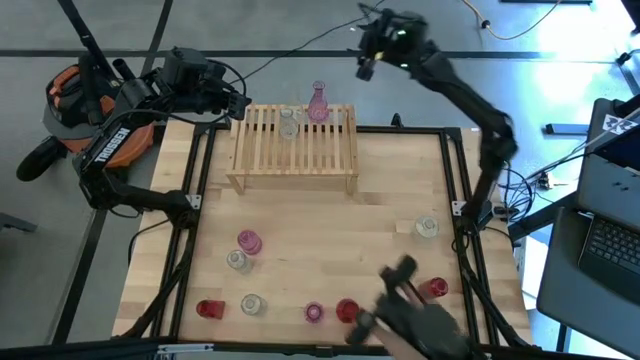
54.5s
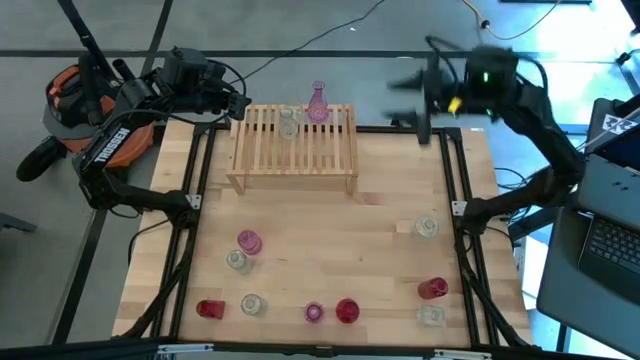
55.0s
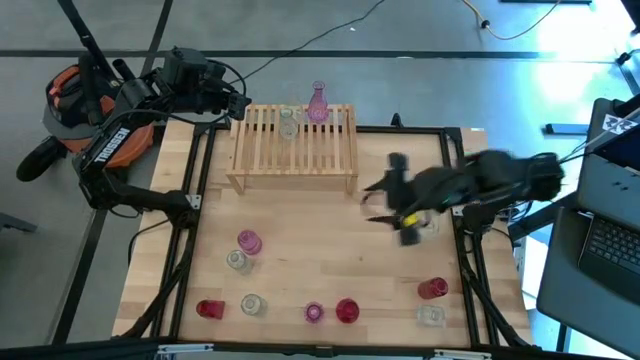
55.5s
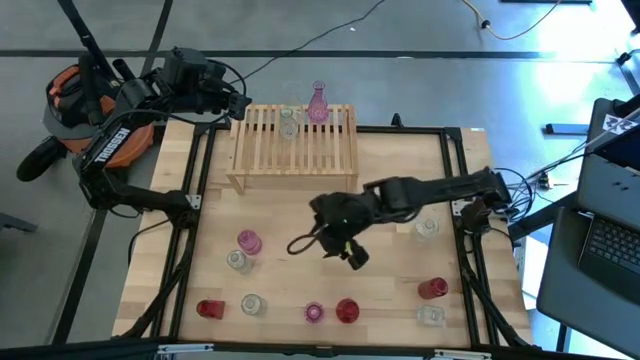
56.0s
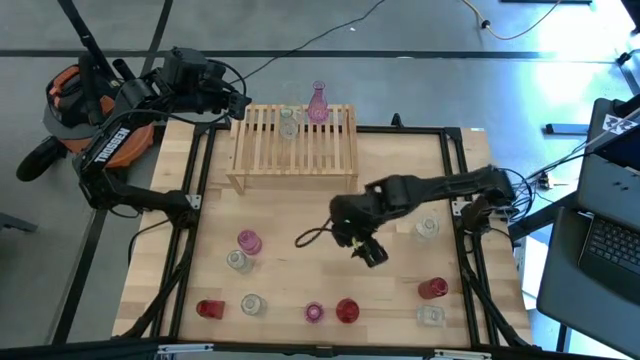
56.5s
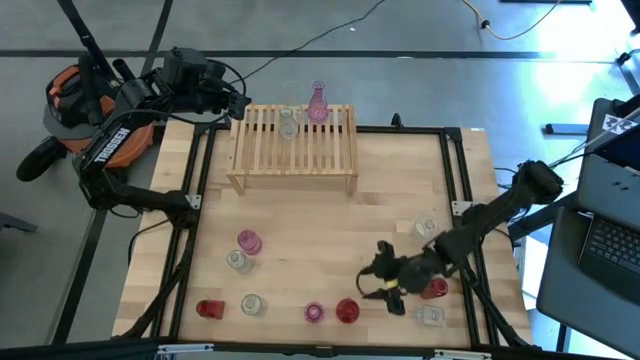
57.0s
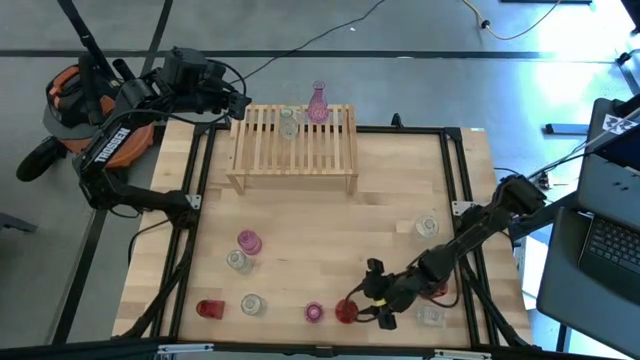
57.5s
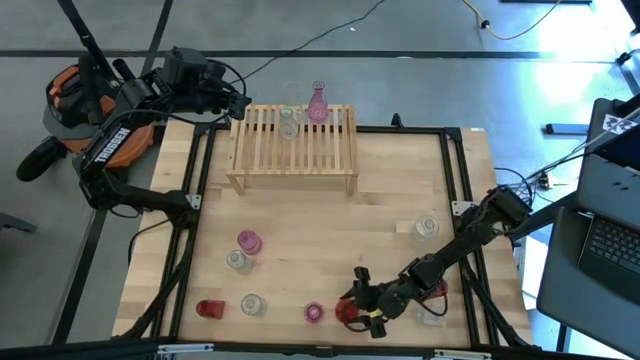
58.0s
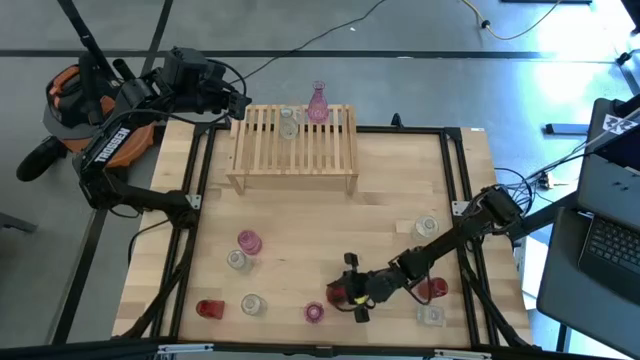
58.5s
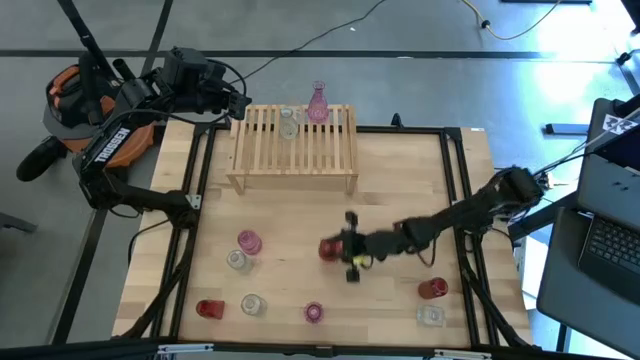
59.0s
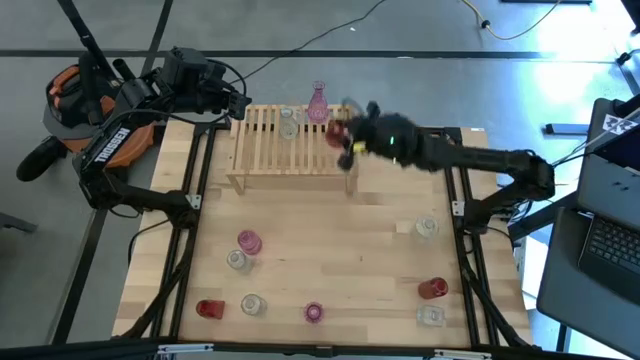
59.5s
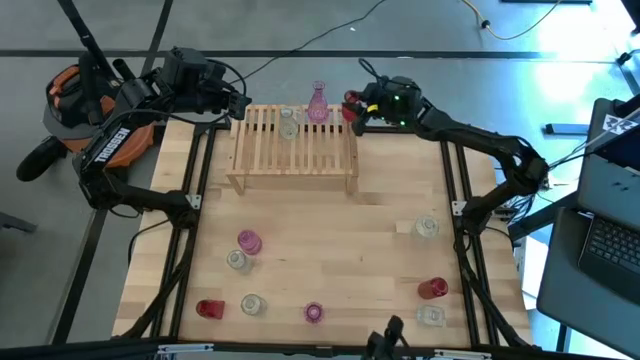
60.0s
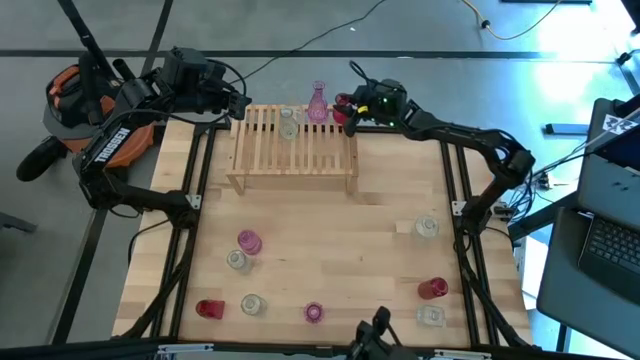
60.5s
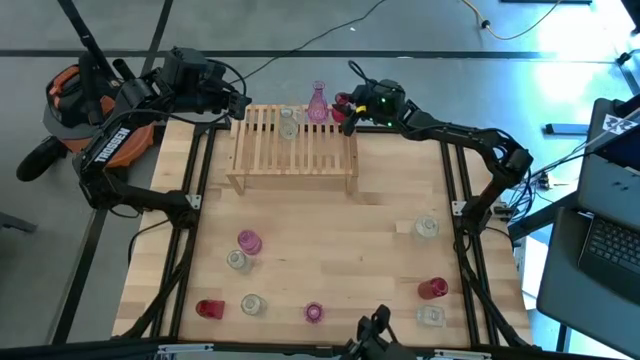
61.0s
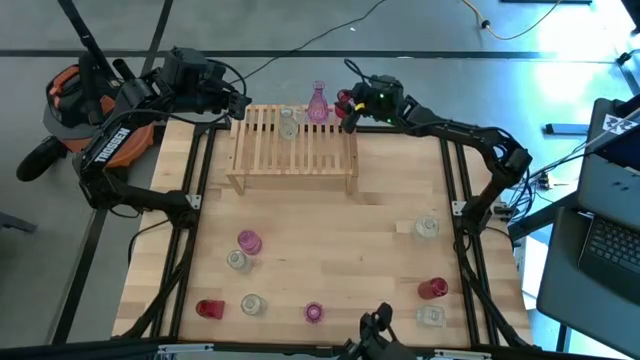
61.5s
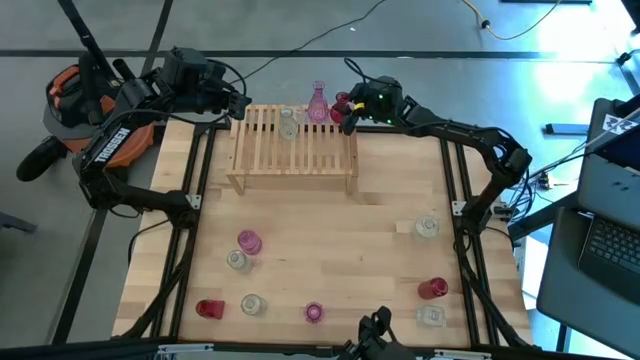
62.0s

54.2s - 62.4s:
Task: sort vases onto shelf
Put the red vase on the shelf

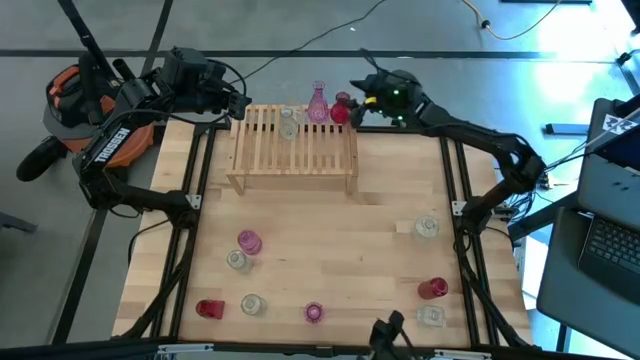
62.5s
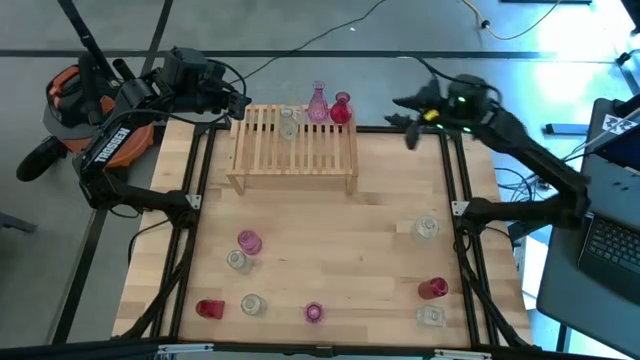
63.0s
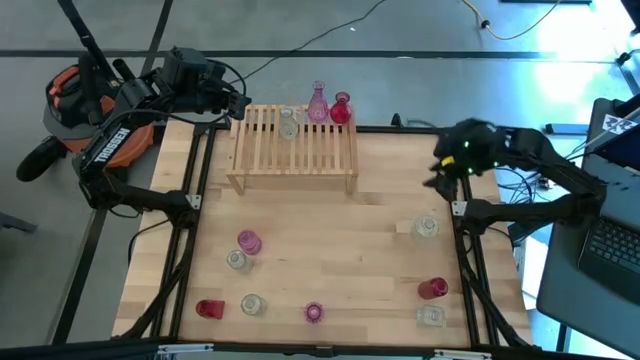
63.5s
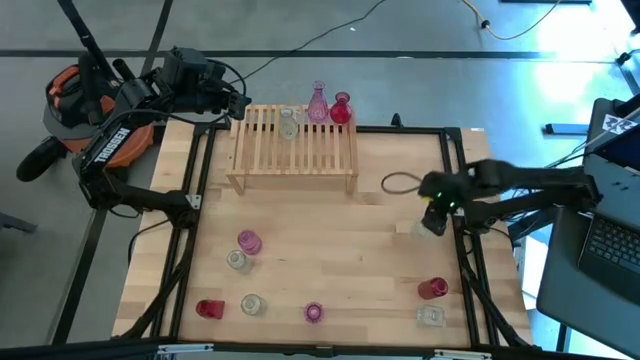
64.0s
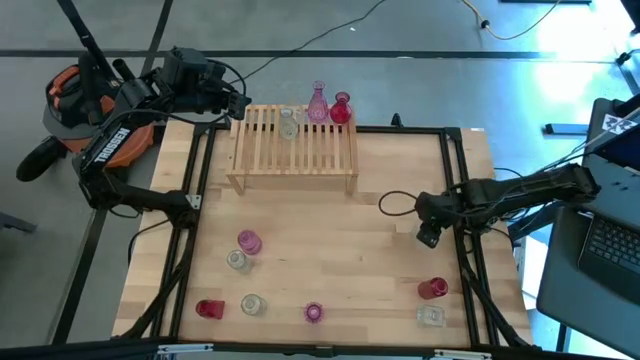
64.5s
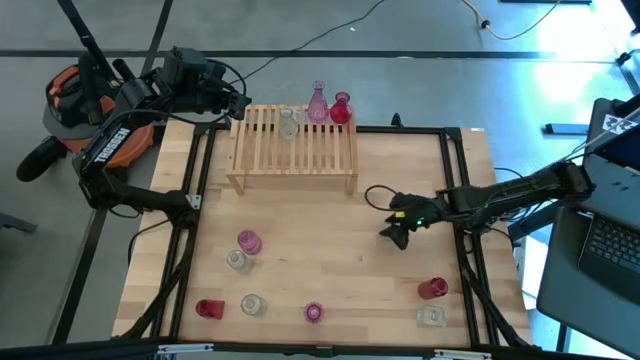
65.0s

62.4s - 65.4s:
Put the transparent vase on the shelf aligned with the other transparent vases on the right

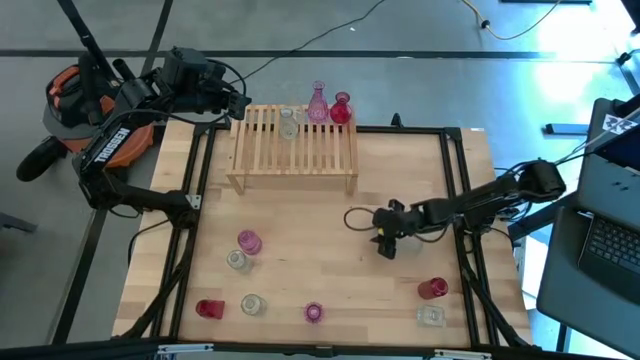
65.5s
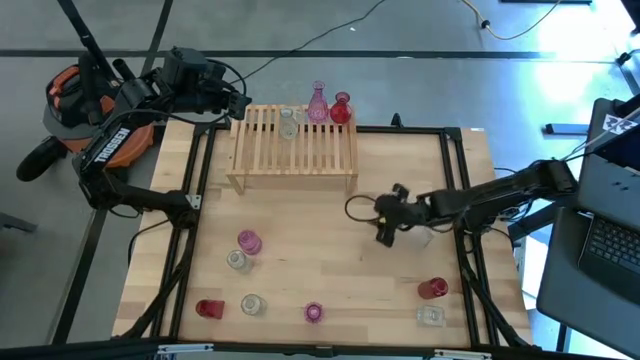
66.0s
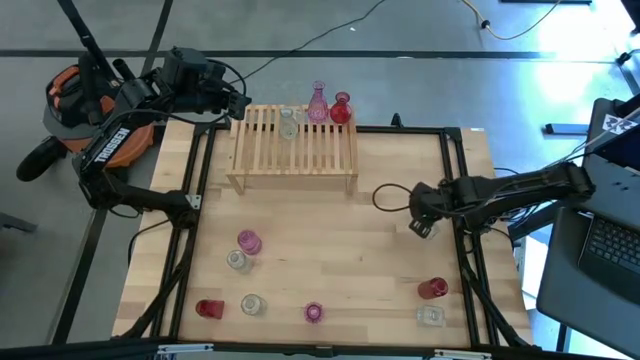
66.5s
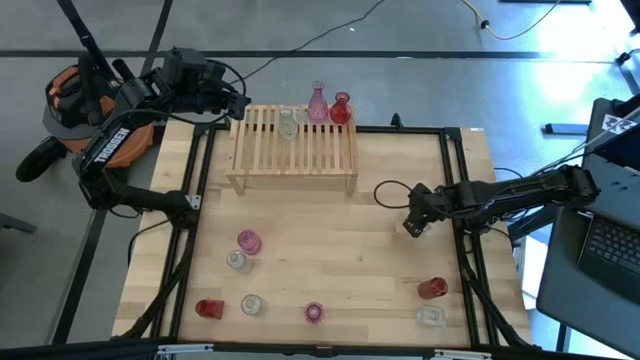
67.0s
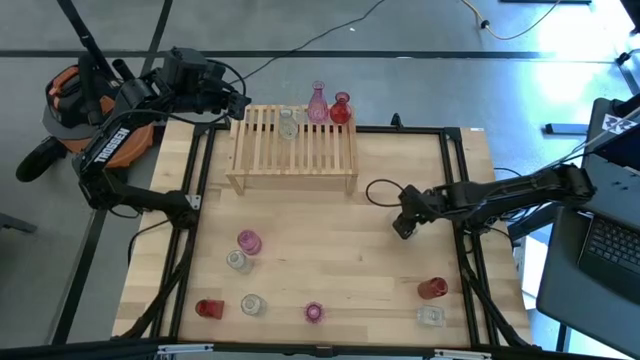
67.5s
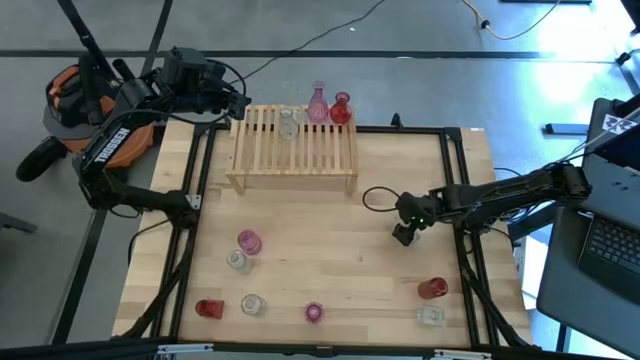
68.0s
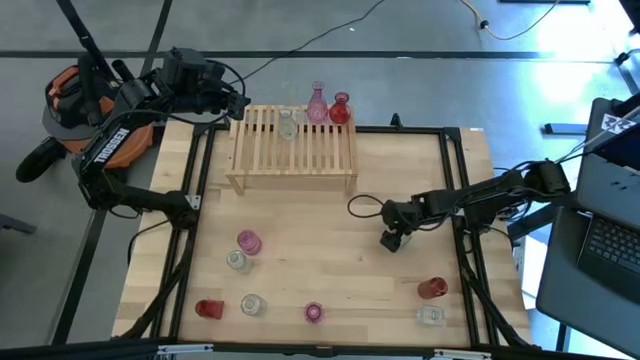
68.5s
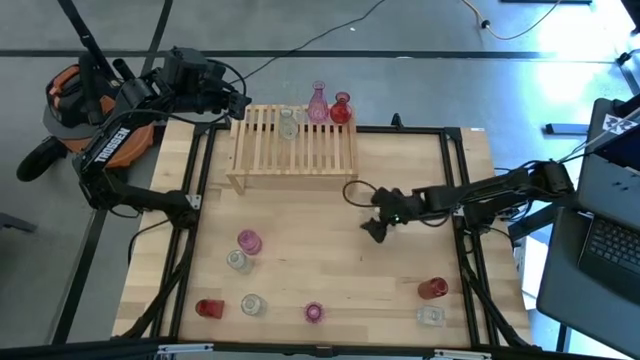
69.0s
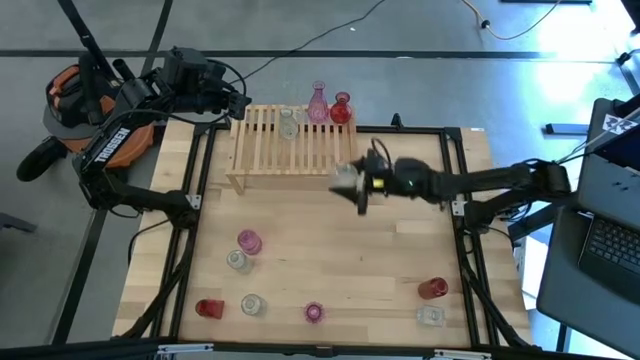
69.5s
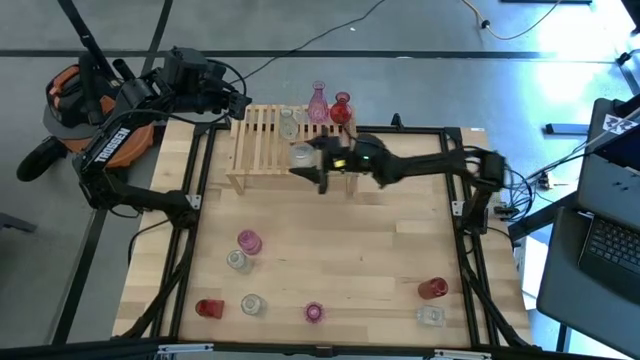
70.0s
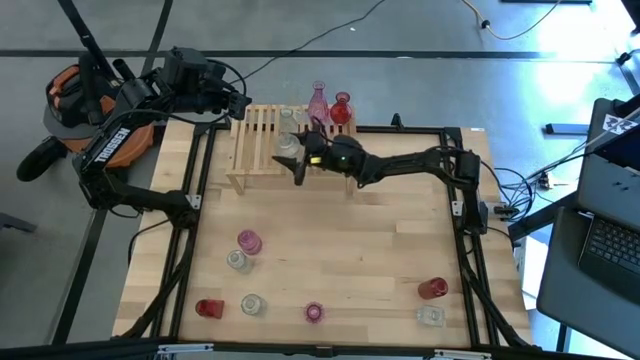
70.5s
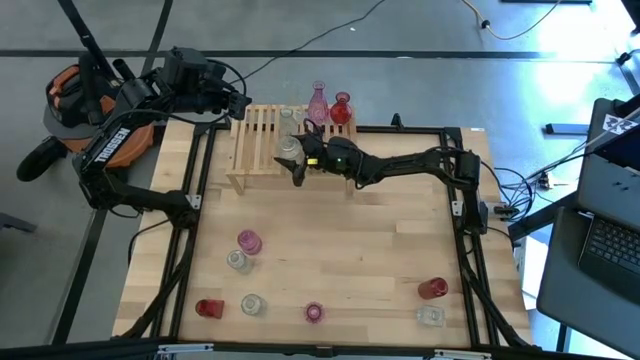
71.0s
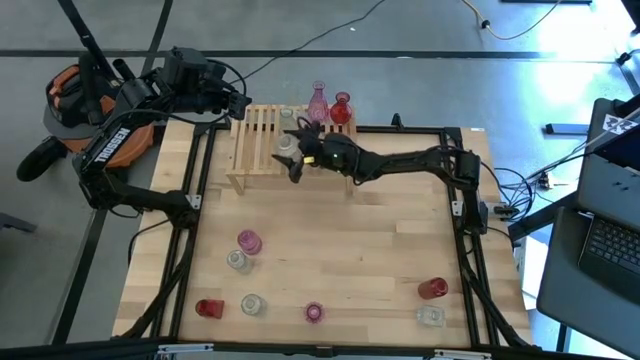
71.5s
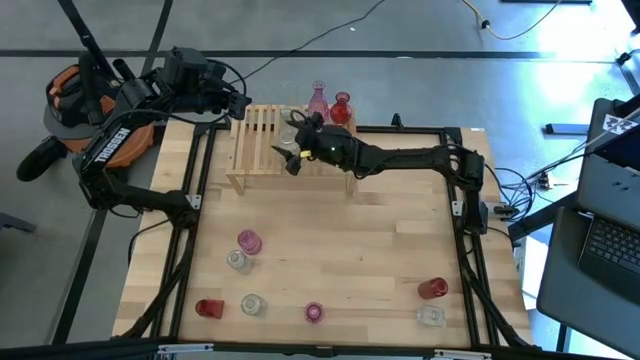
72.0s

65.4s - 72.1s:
Put the transparent vase on the shelf aligned with the other transparent vases on the right

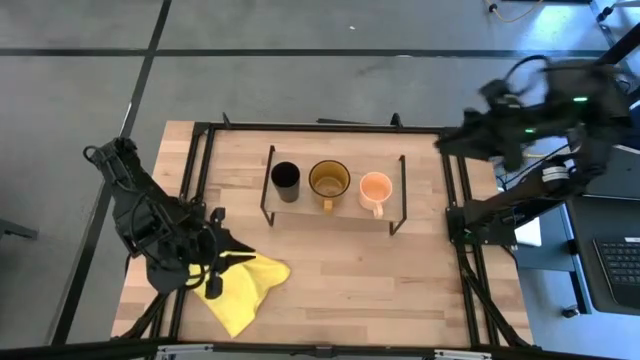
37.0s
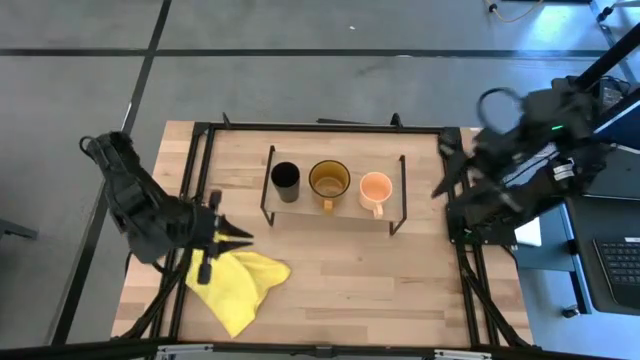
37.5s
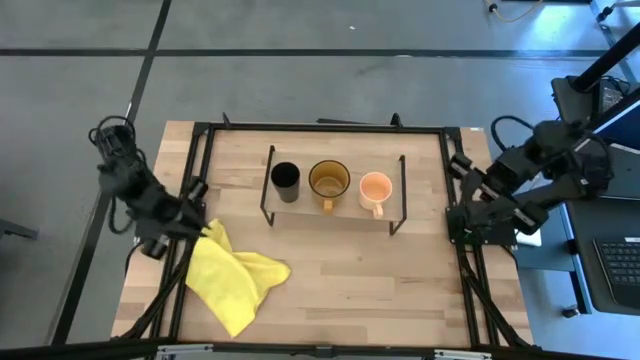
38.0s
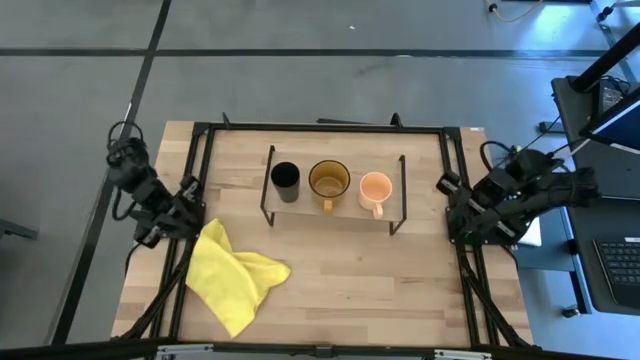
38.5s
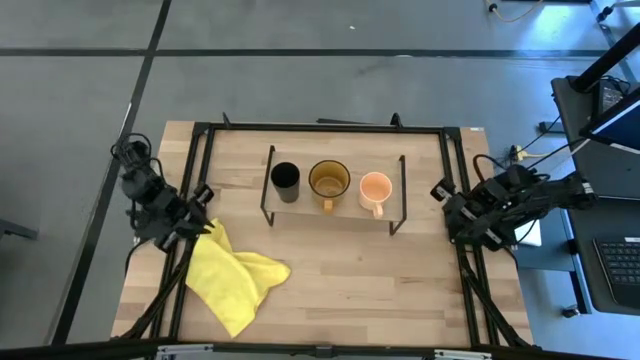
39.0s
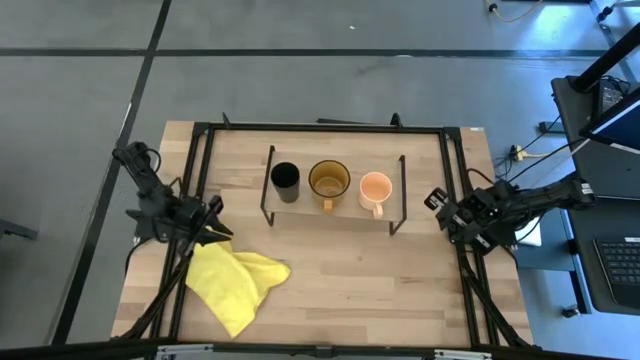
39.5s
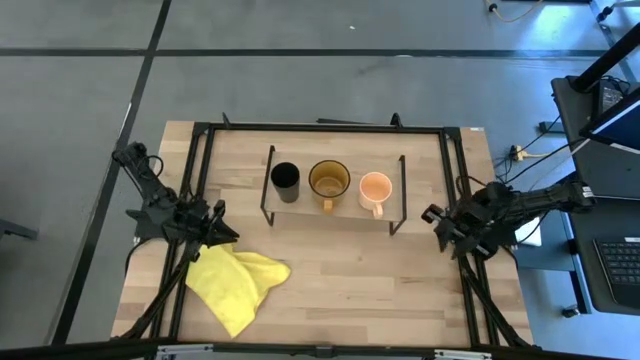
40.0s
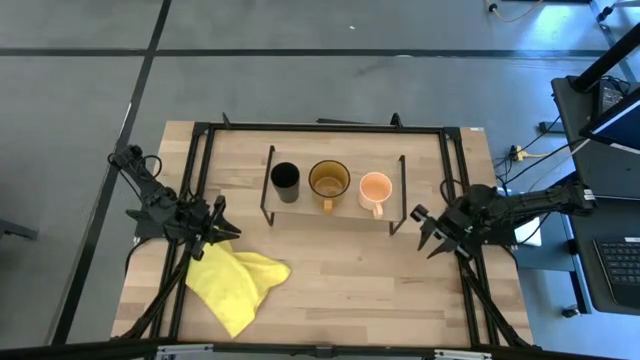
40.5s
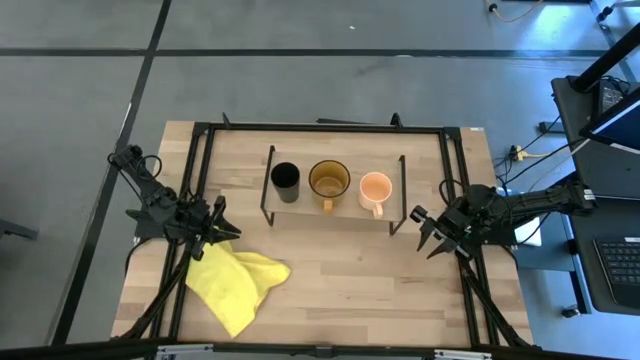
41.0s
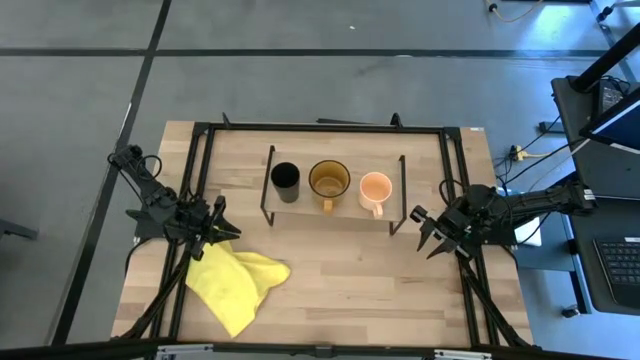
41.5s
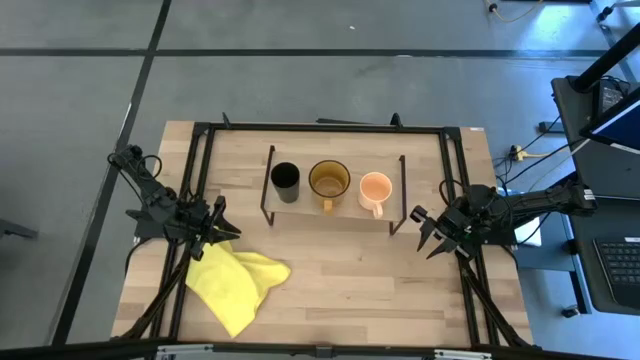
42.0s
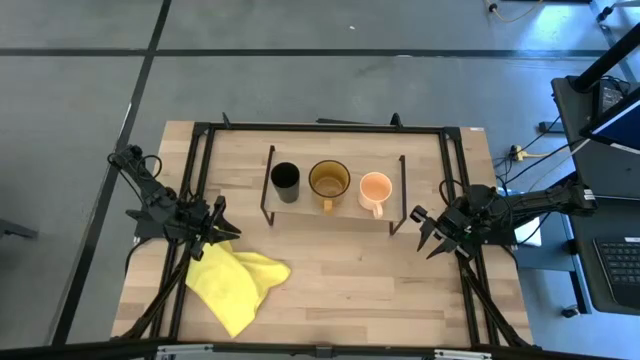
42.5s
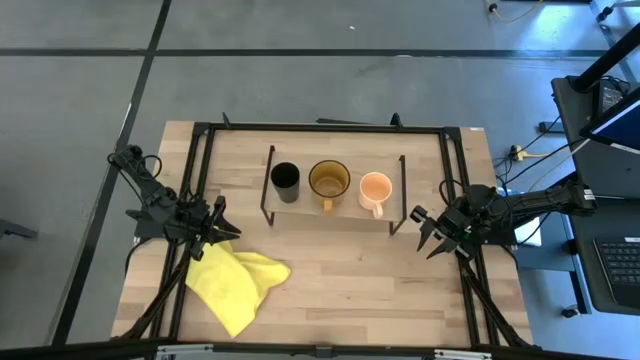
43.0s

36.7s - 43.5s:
Task: Stack small to large cups/mugs on shelf
Return to Home Position
